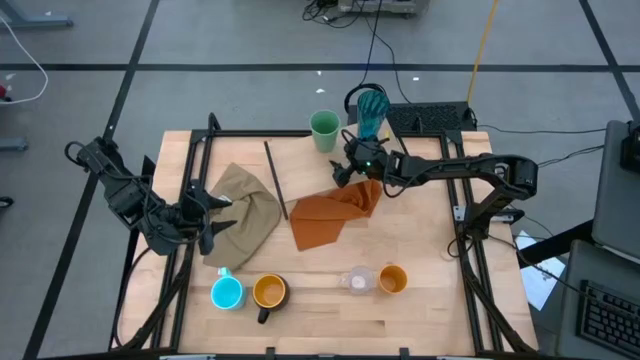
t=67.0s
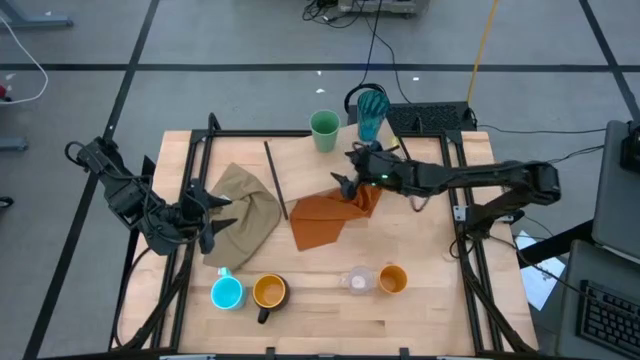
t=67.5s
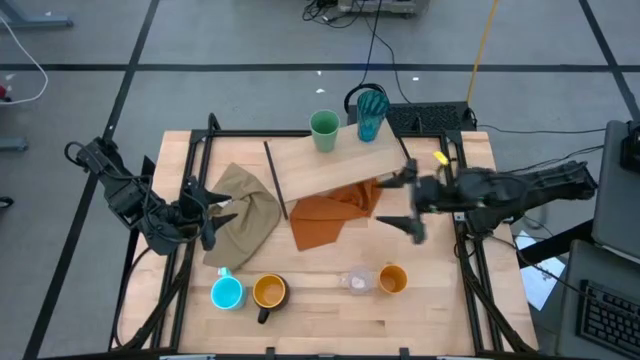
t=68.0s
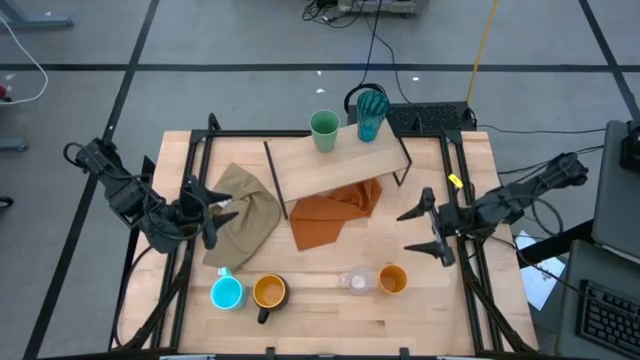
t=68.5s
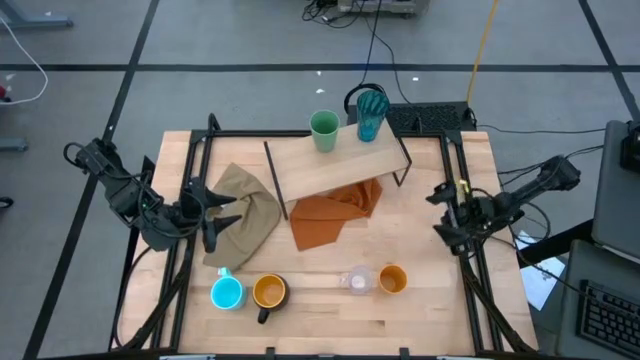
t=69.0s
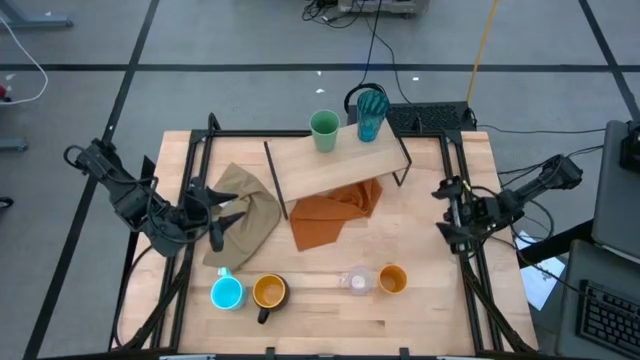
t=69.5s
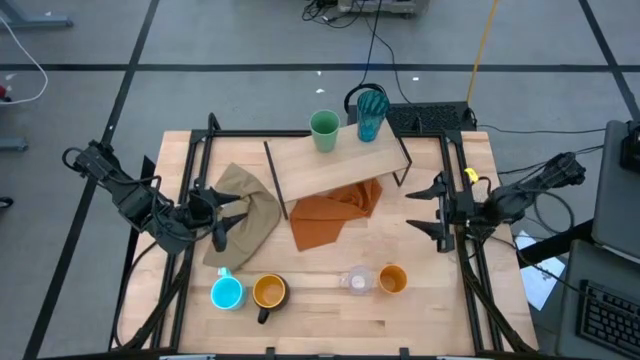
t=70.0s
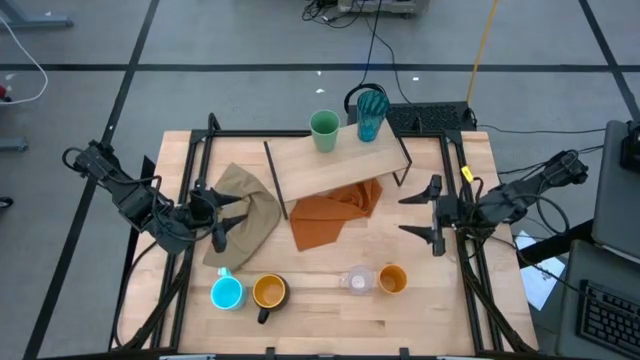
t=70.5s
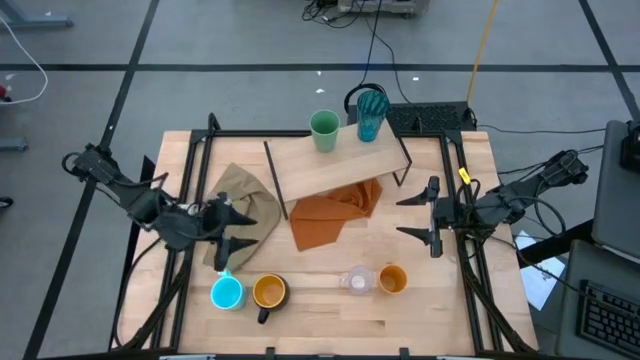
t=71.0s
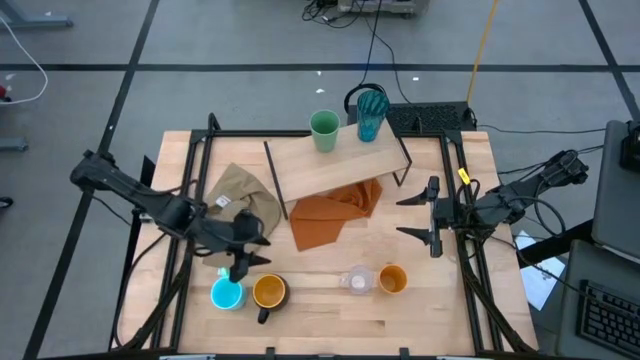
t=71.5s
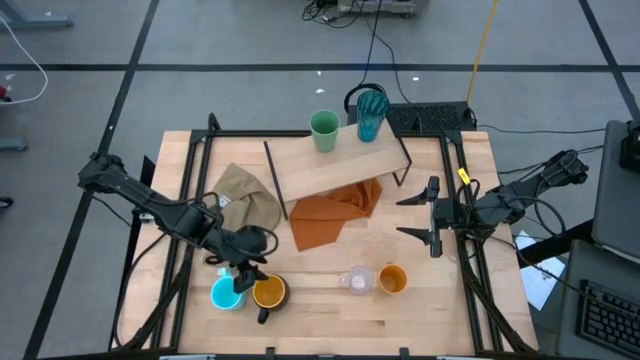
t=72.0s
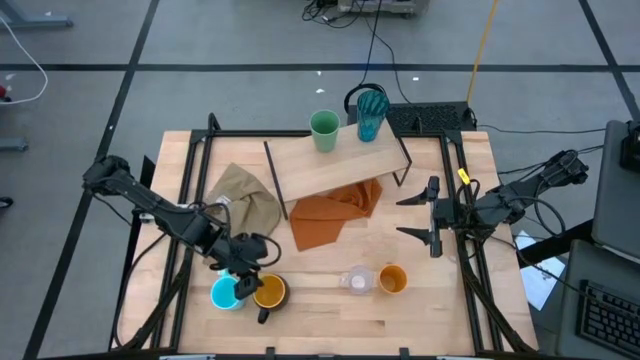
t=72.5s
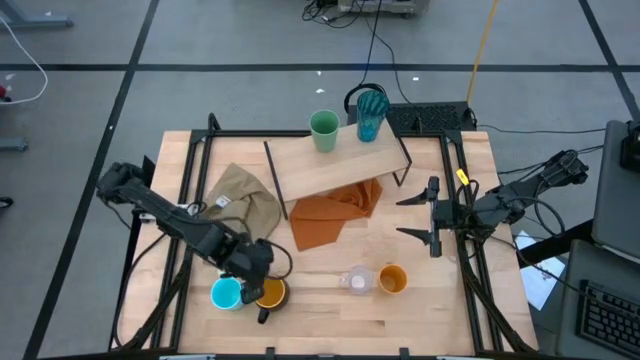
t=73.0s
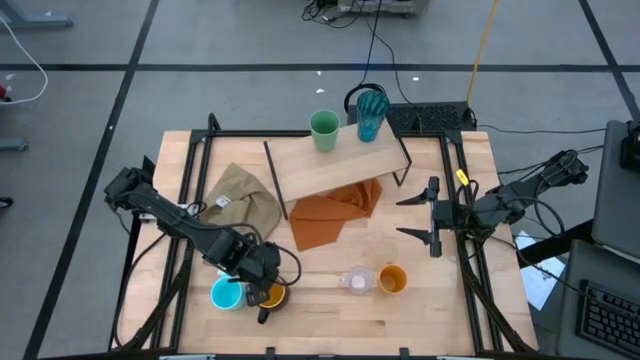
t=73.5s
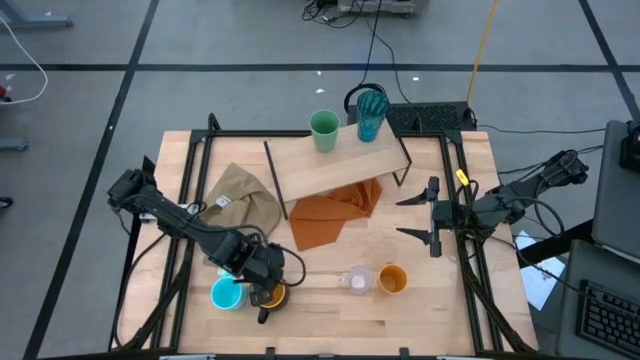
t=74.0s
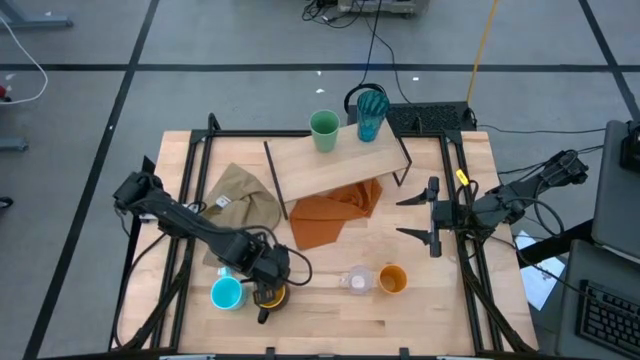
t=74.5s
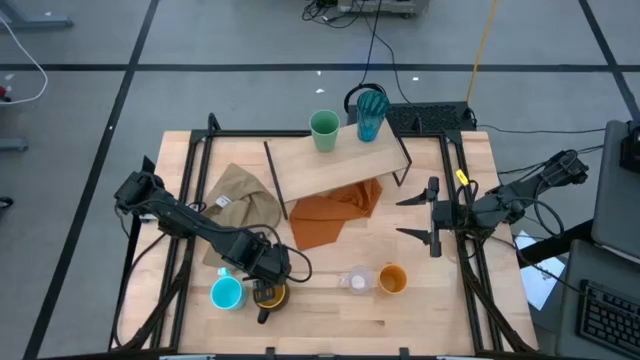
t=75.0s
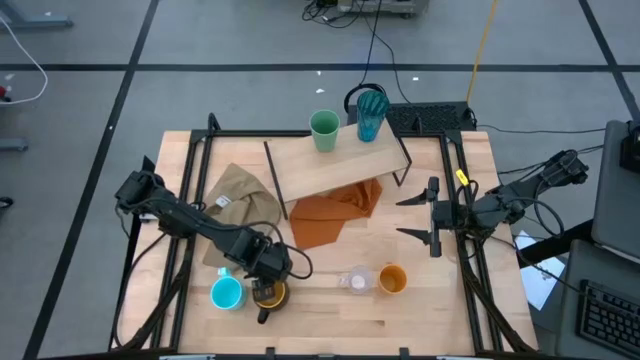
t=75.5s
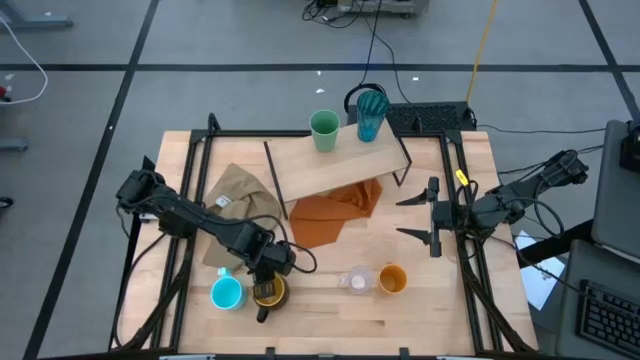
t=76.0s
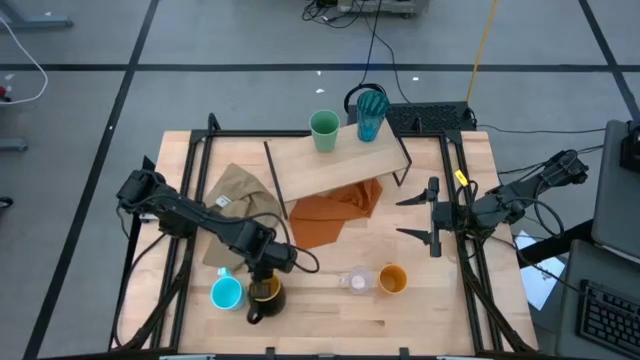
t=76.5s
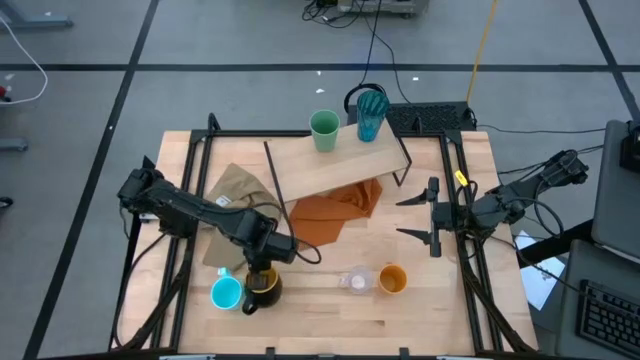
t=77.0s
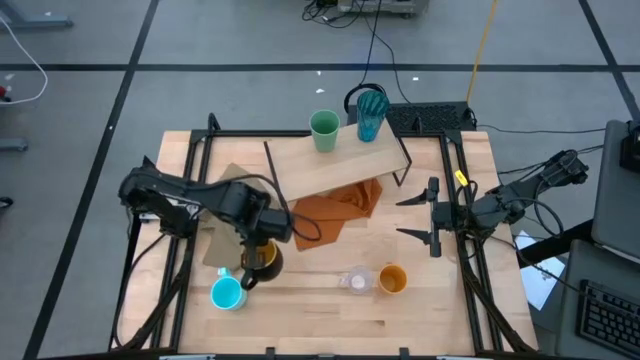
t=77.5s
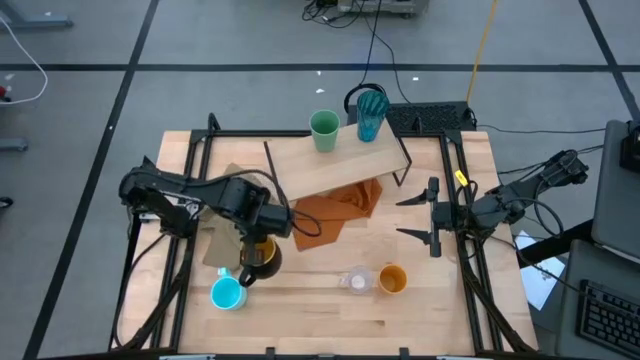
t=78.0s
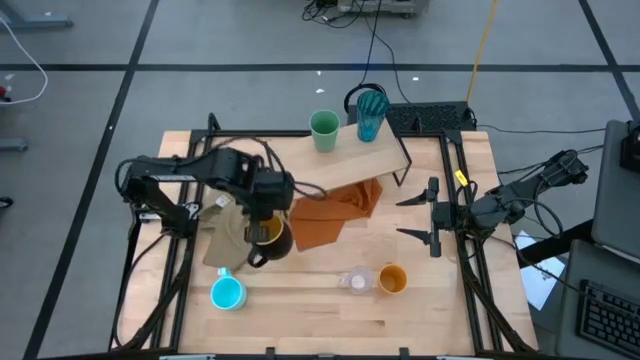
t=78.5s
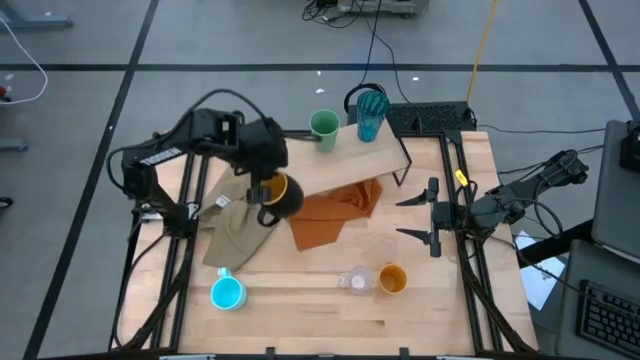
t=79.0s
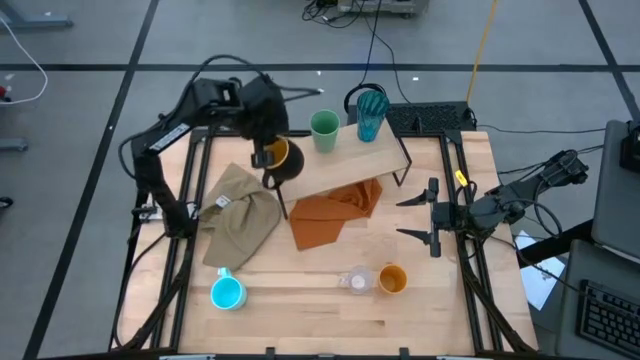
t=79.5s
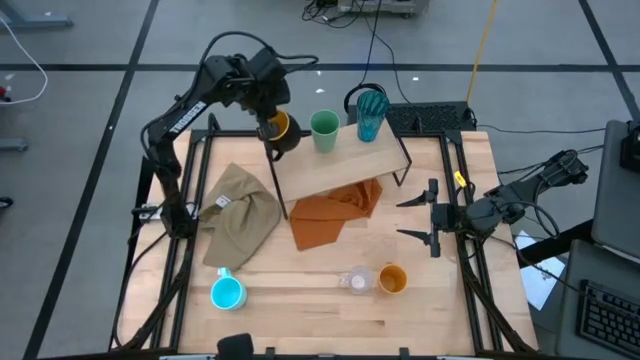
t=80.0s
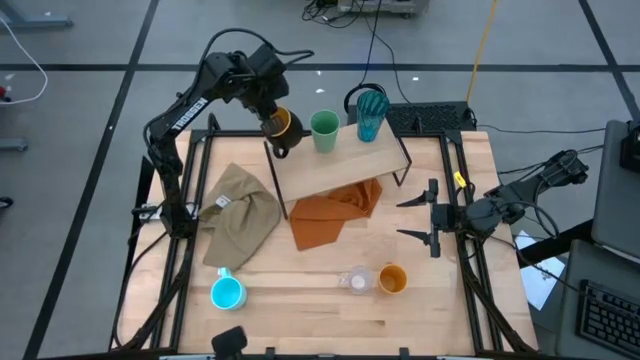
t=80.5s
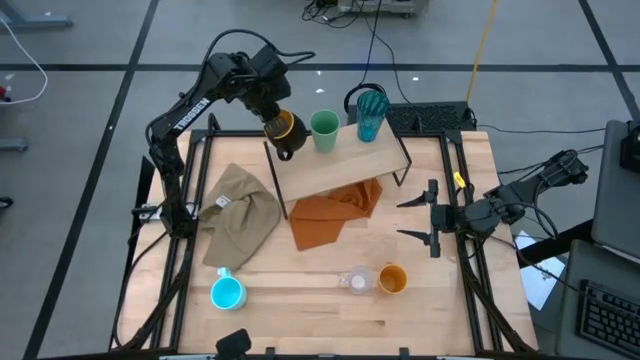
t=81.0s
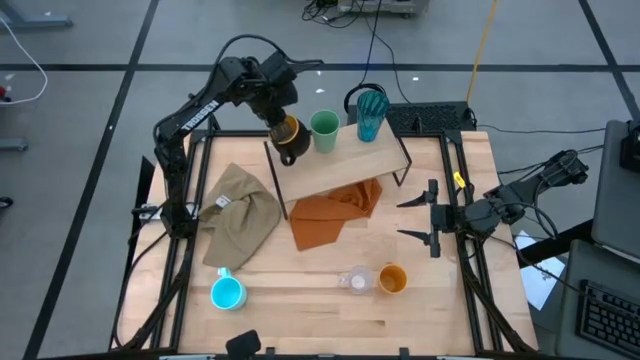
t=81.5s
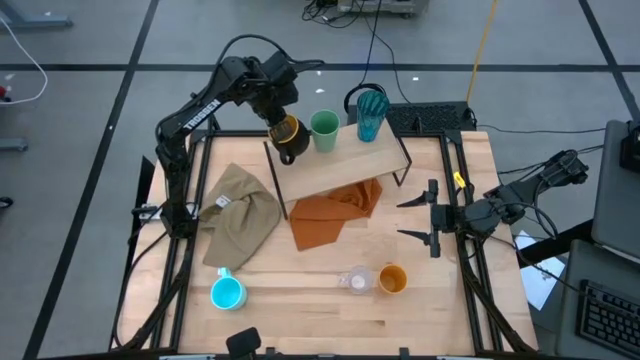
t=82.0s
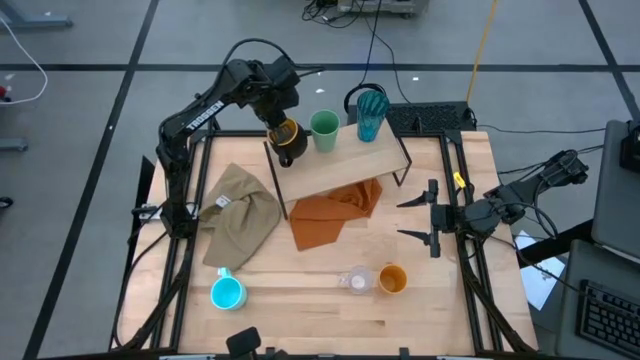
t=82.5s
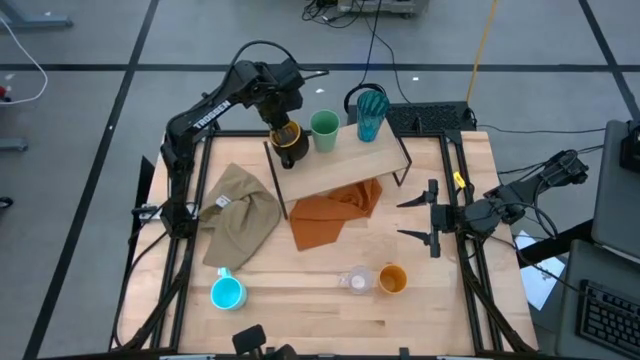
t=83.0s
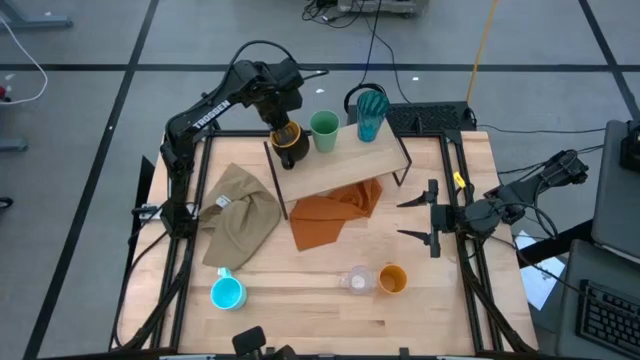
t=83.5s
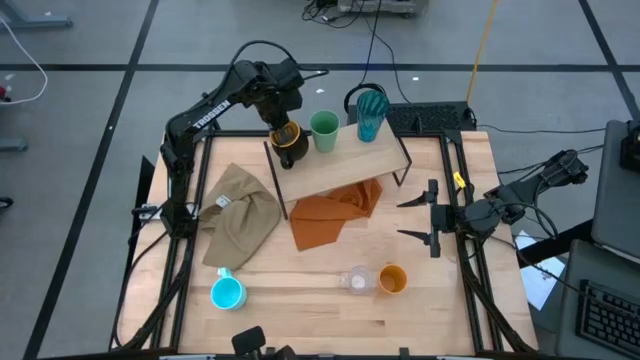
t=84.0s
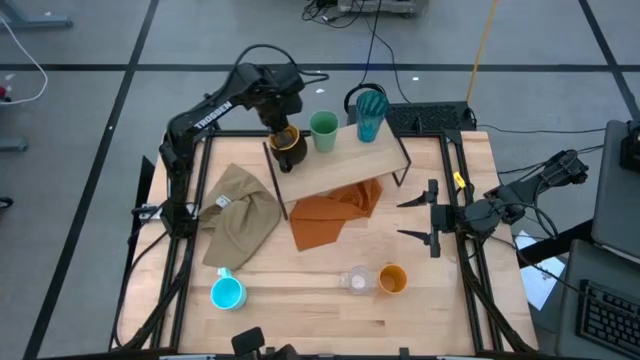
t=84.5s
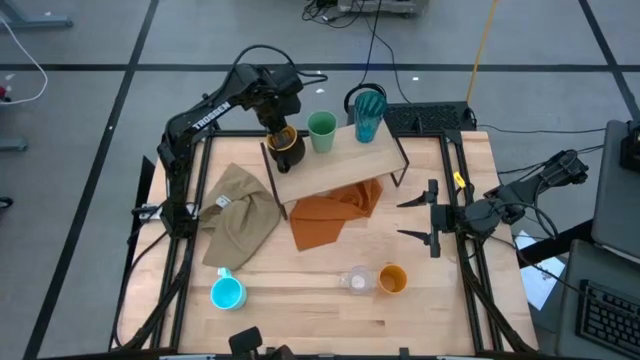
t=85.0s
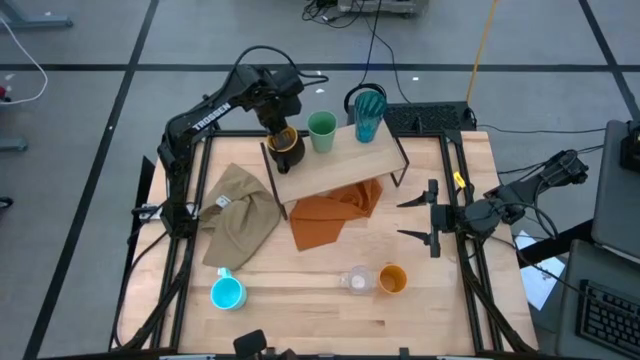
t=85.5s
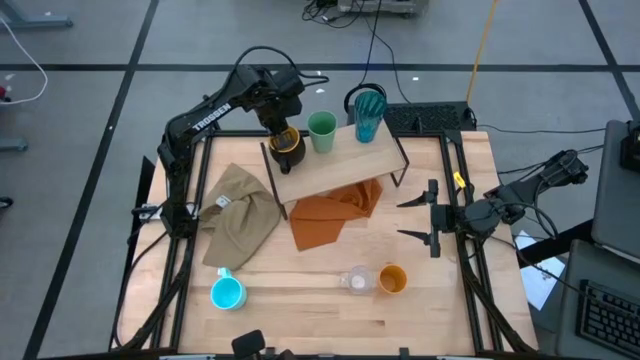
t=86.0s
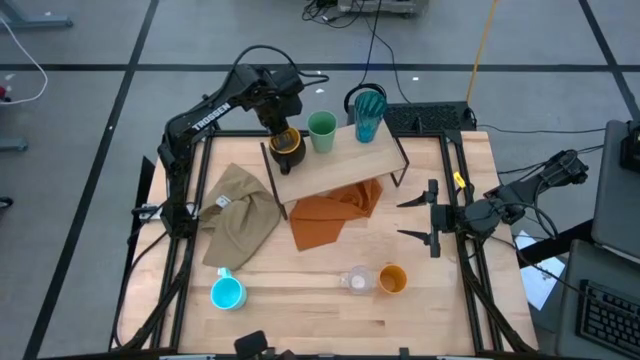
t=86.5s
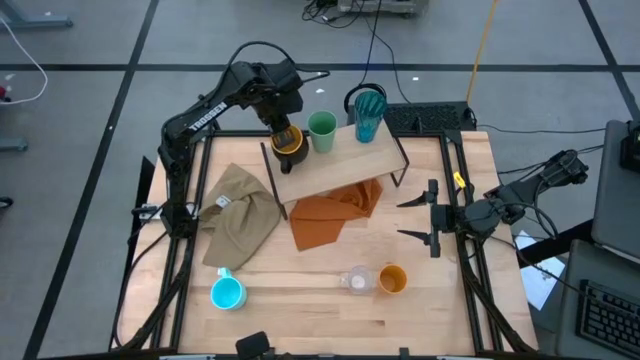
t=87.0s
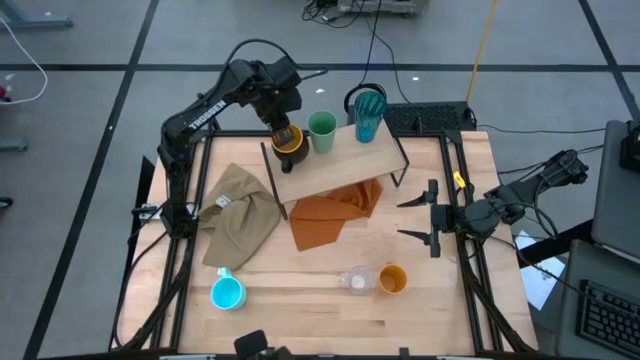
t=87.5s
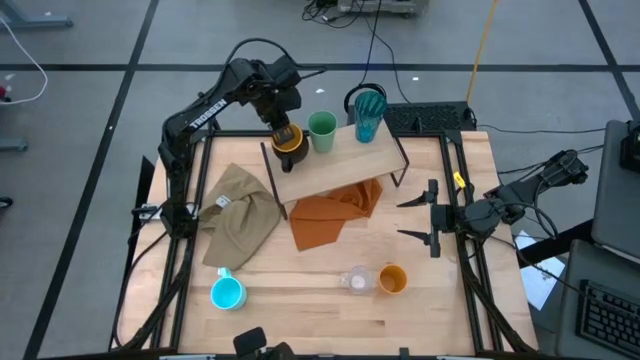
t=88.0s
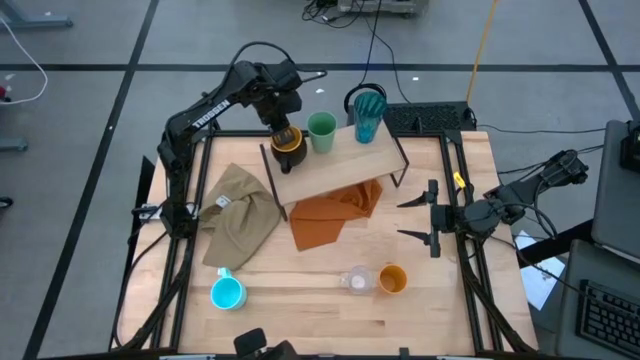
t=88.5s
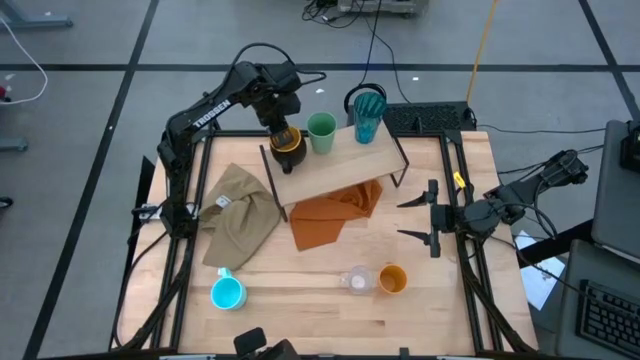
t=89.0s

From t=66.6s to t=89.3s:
Task: Stack small to large cups/mugs on shelf
Put the black mug on the shelf
